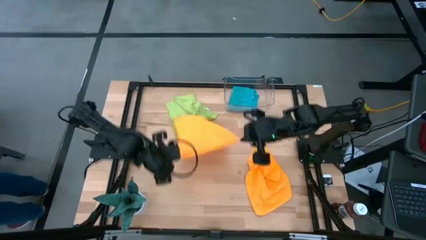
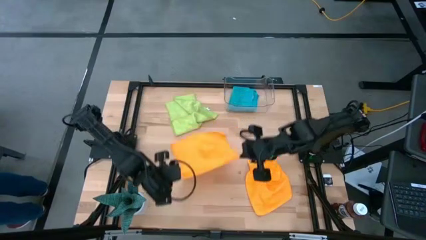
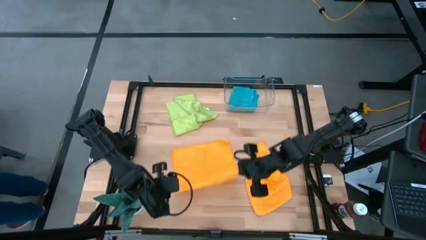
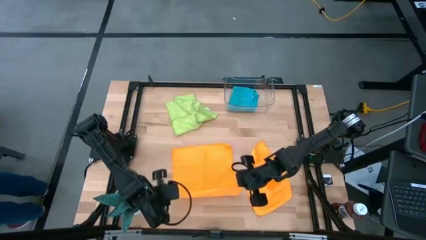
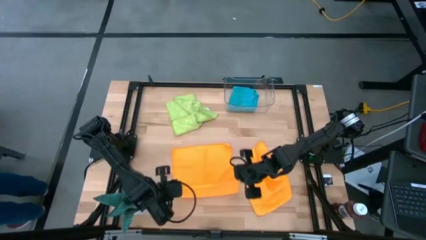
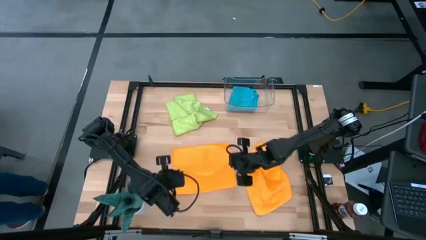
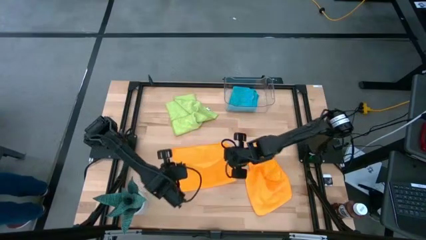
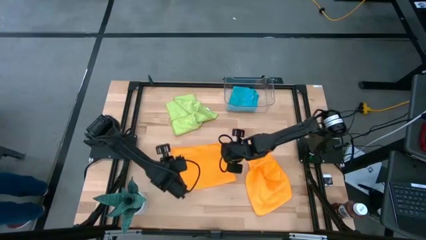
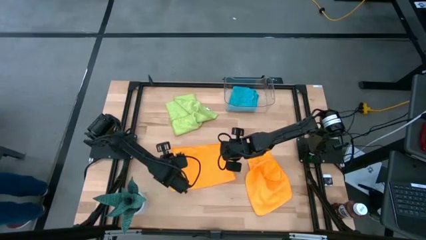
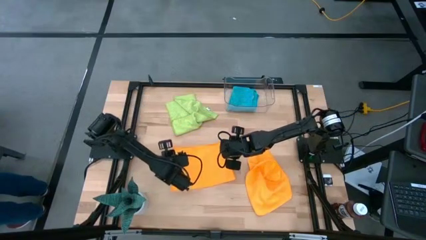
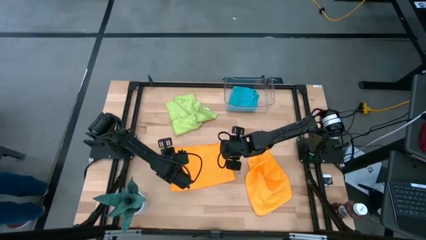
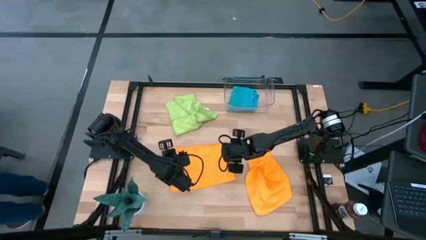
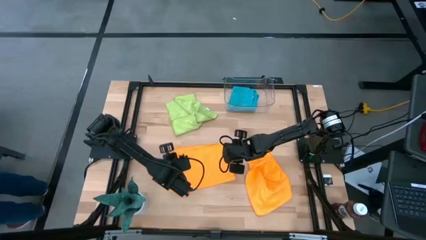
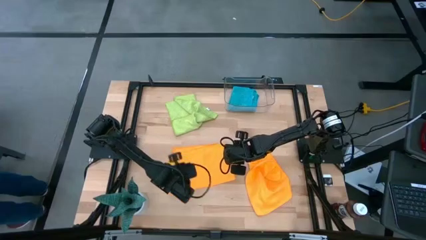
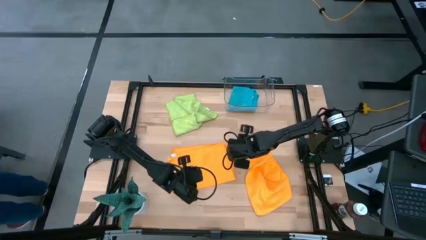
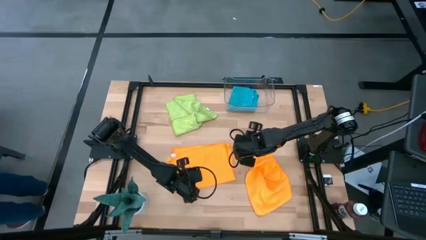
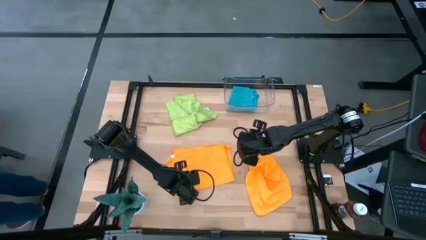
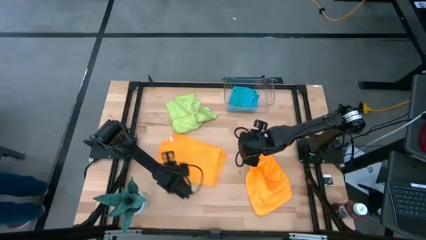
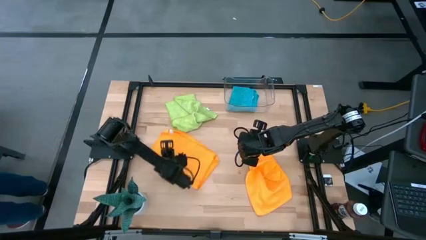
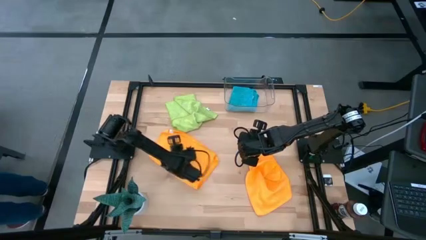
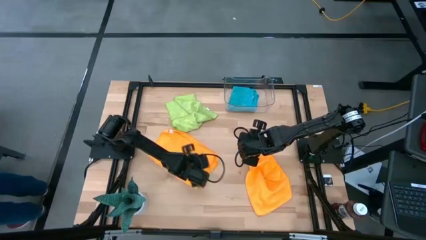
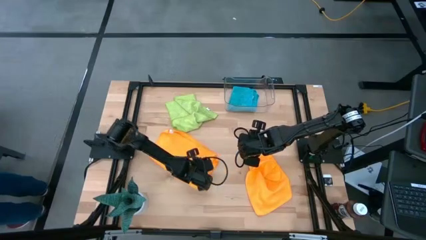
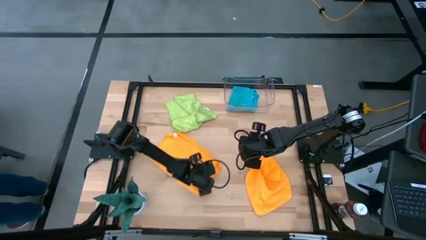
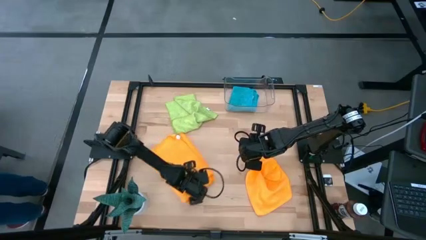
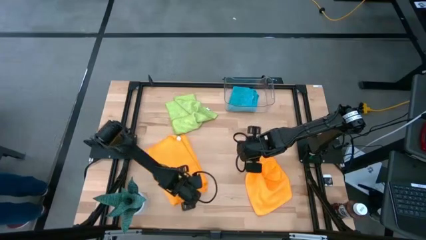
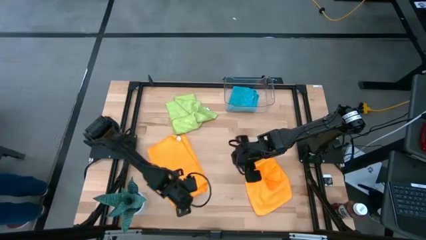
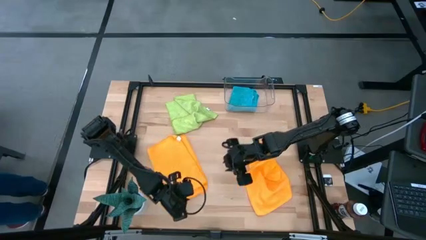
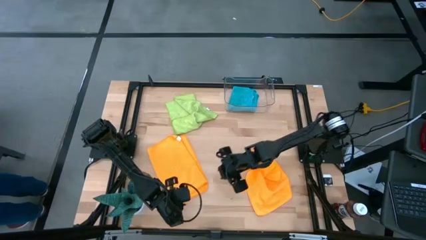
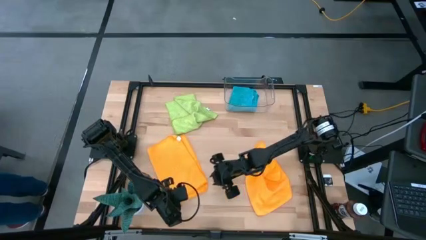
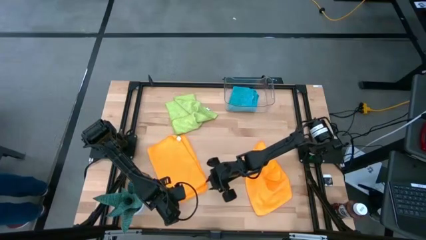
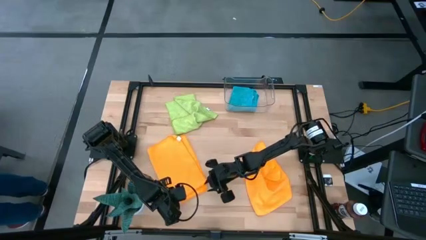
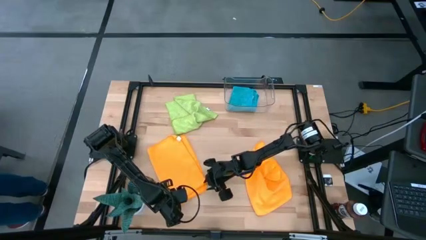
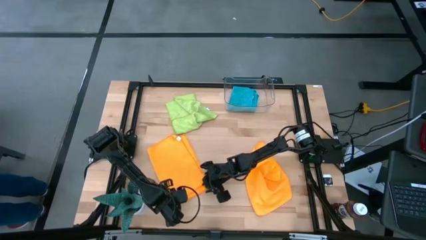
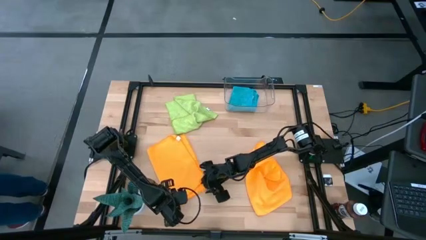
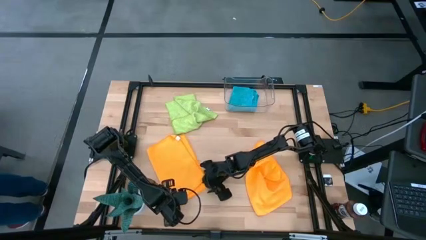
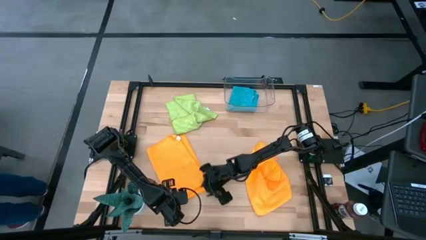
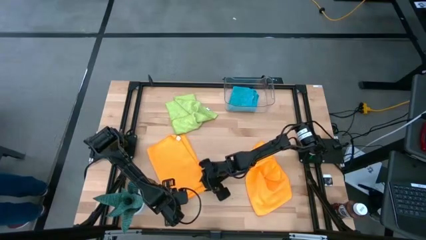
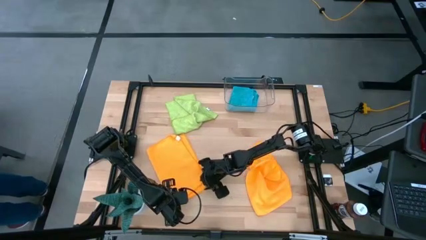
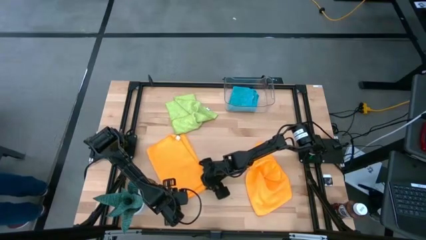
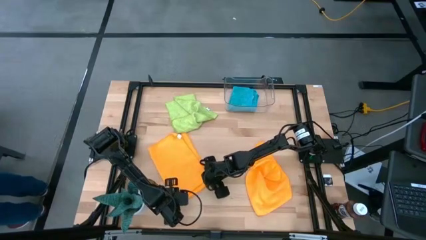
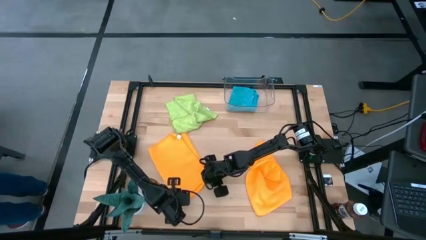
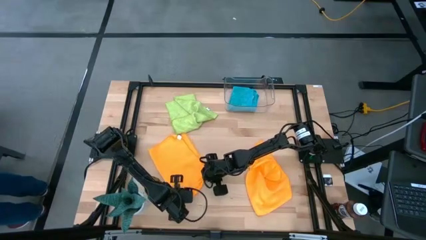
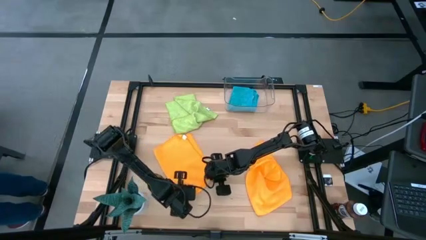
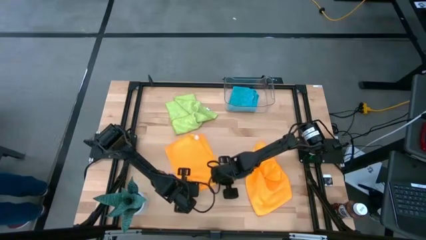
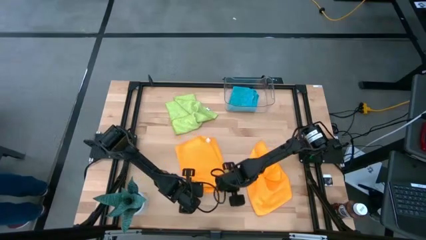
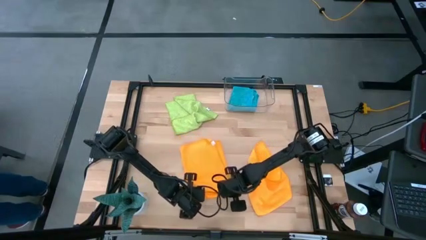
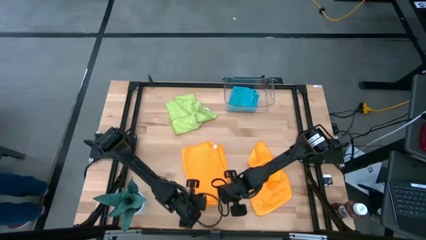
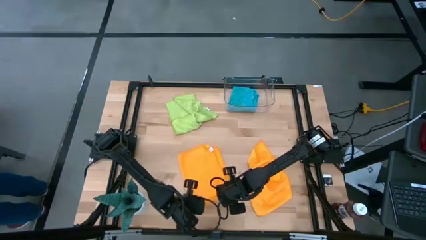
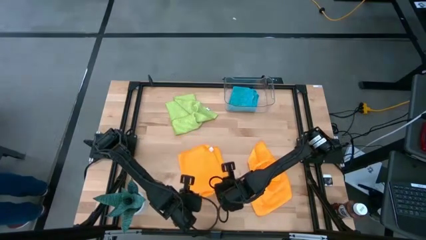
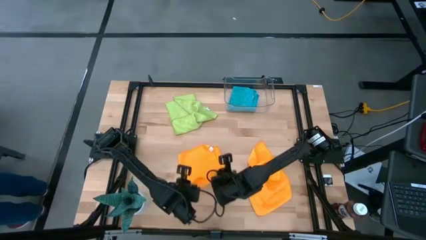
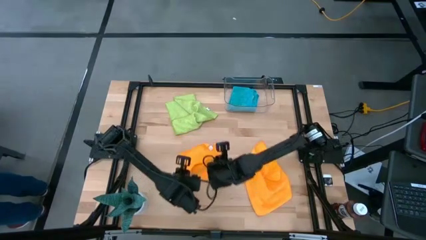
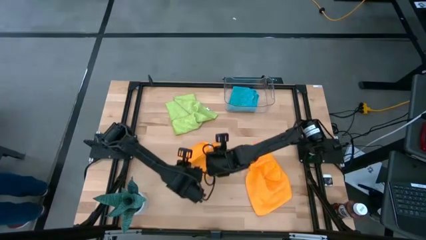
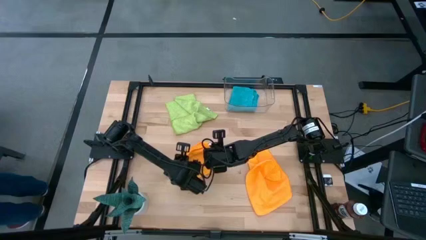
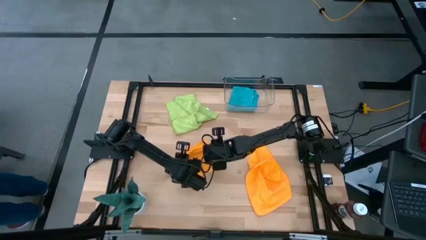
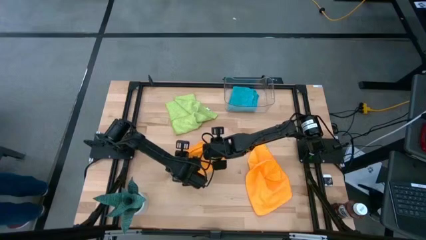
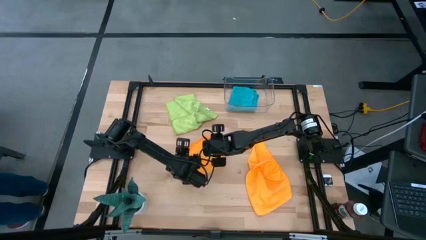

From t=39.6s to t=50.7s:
Task: Fold microfiber towels
Fold the left yellow microfiber cloth

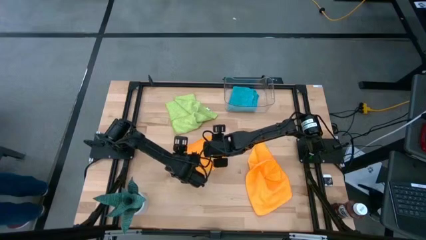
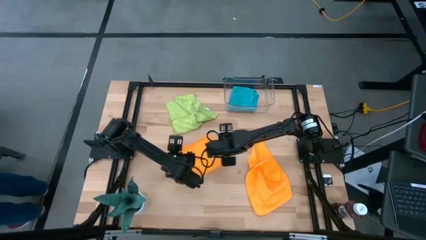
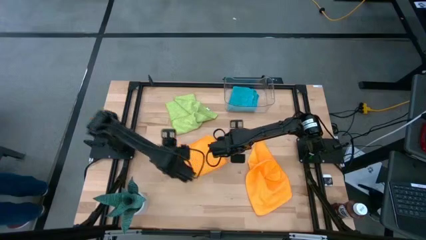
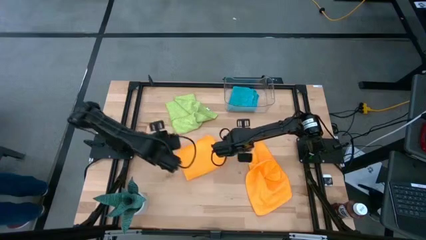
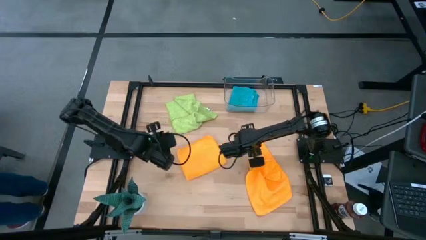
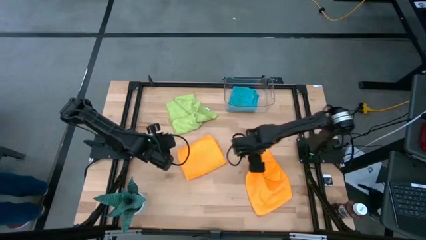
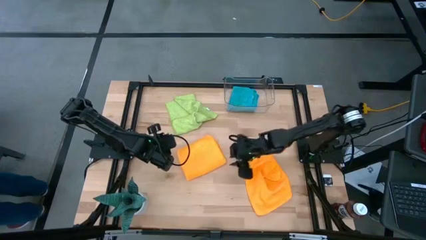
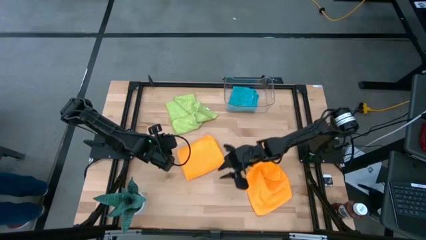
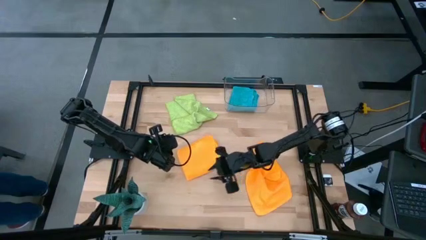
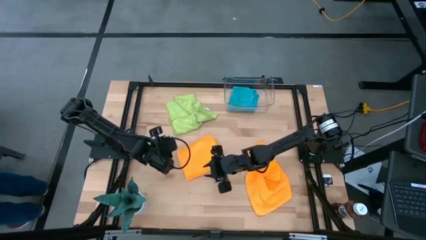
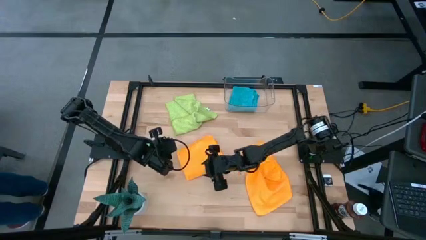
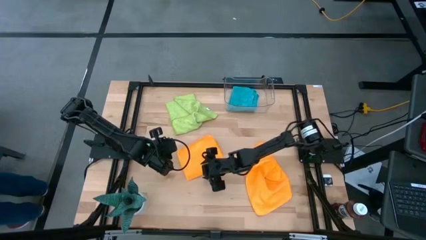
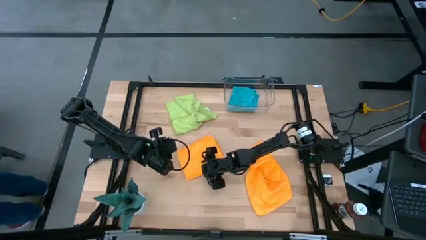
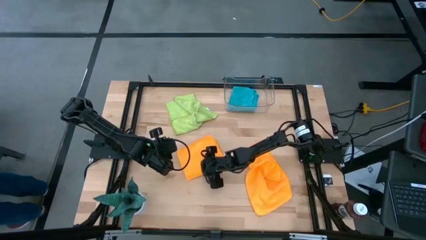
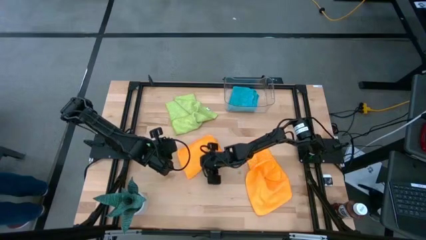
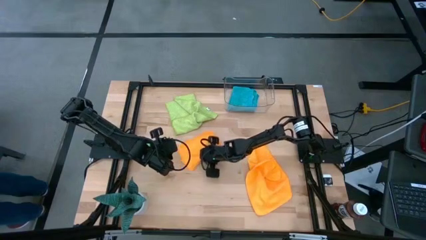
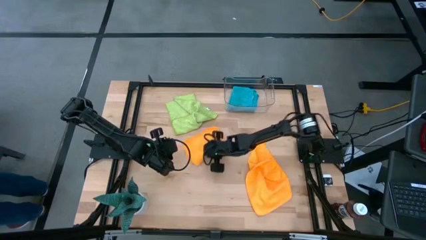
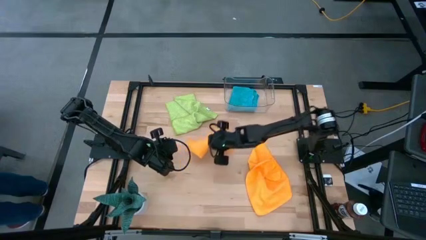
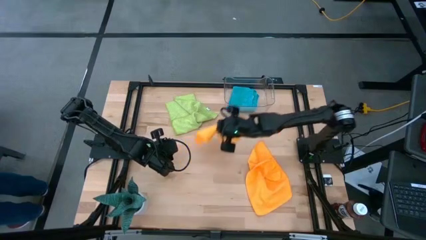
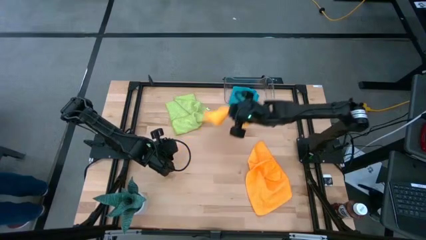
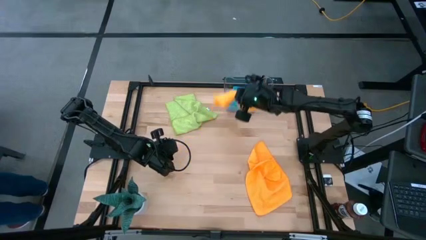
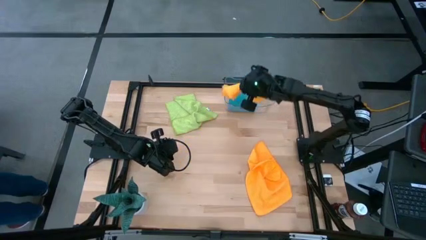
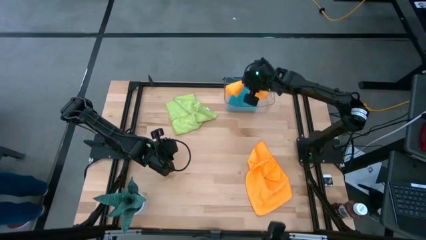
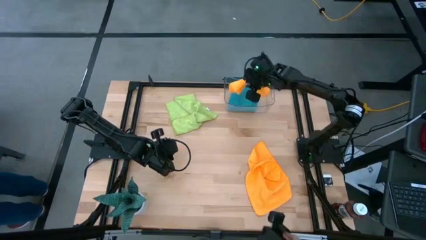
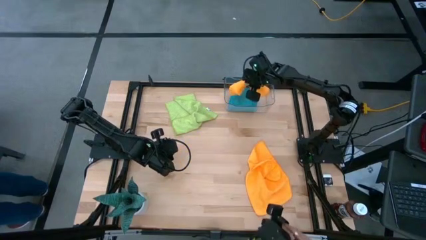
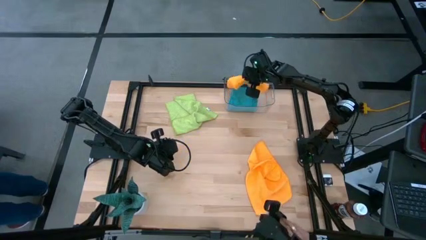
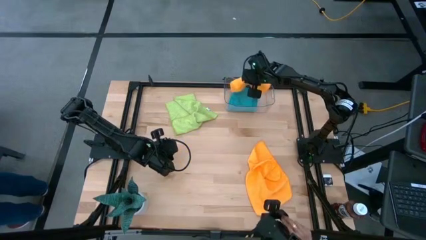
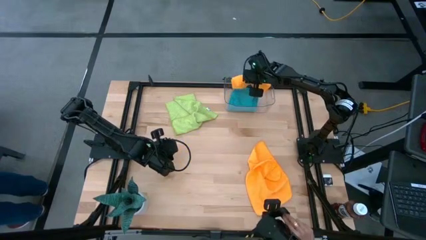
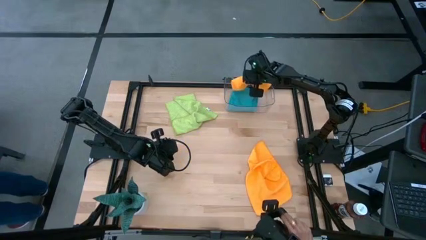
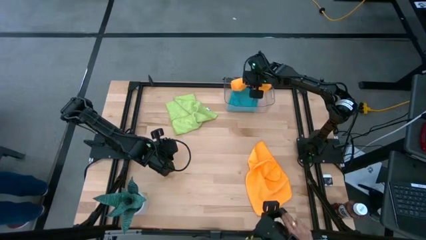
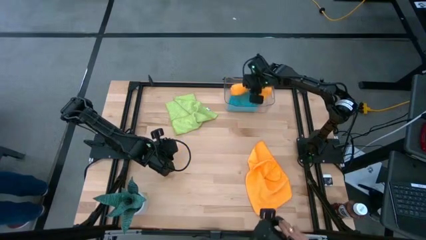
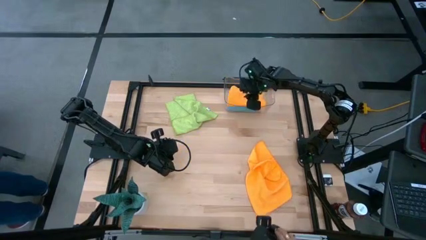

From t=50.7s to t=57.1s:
Put the folded yellow microfiber cloth into the transparent bin
